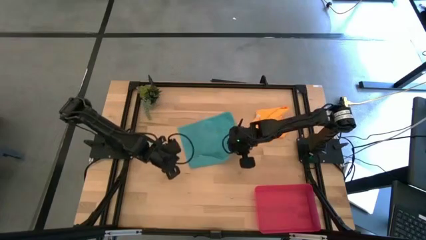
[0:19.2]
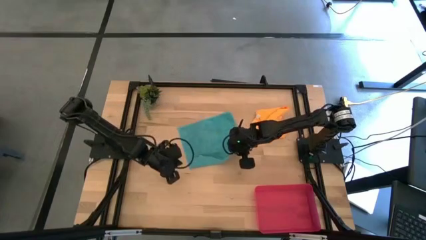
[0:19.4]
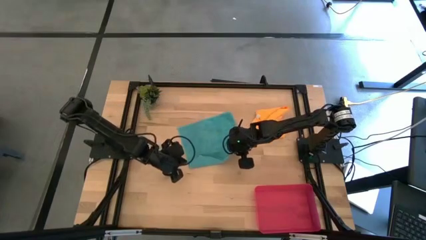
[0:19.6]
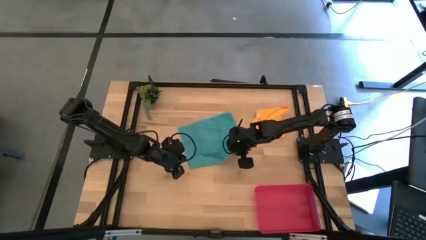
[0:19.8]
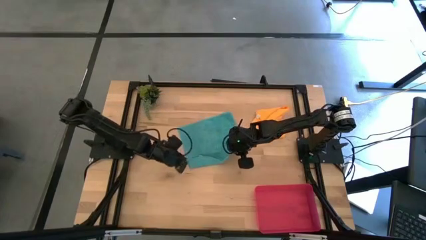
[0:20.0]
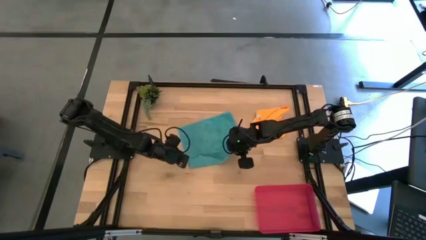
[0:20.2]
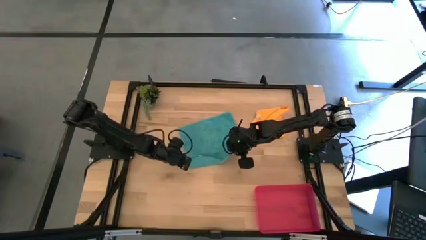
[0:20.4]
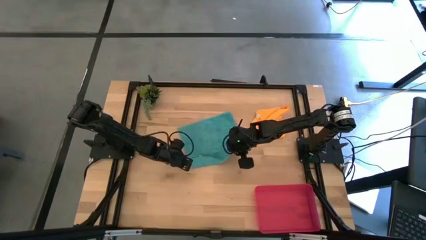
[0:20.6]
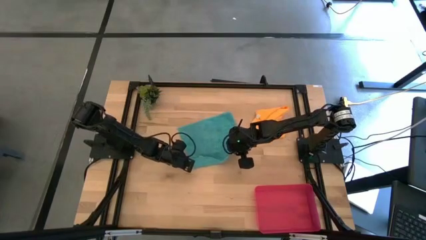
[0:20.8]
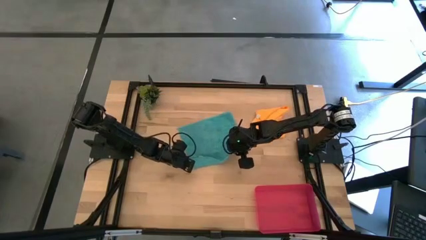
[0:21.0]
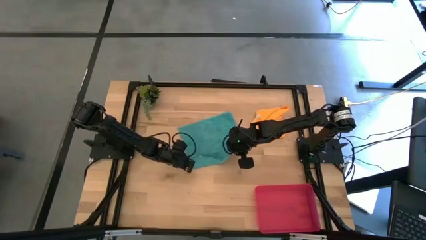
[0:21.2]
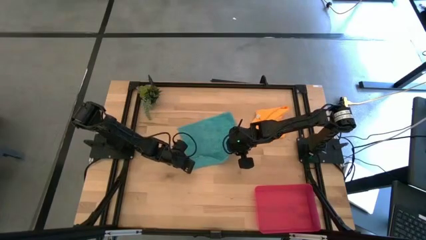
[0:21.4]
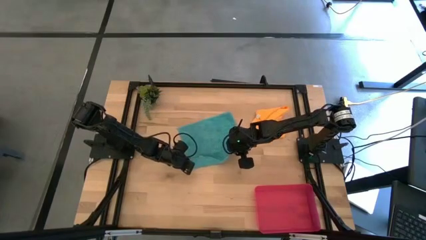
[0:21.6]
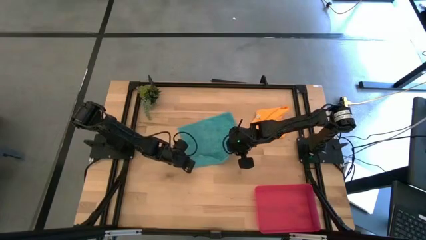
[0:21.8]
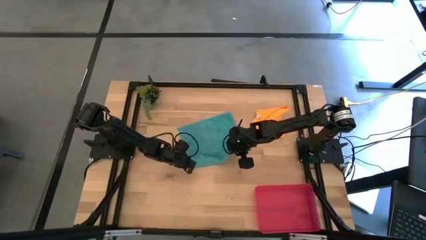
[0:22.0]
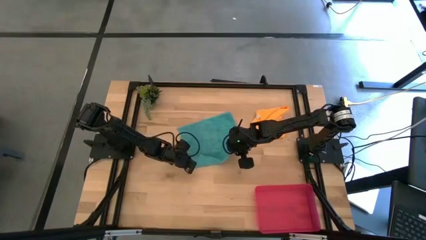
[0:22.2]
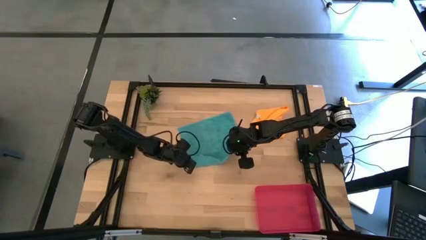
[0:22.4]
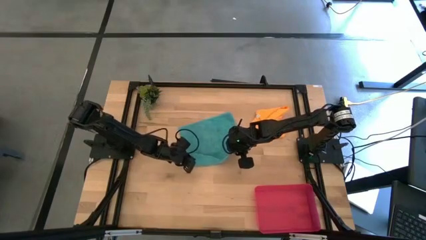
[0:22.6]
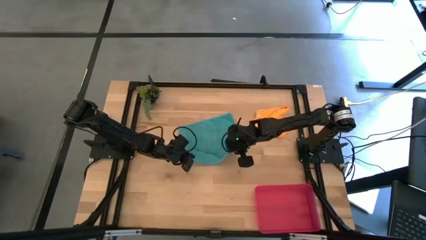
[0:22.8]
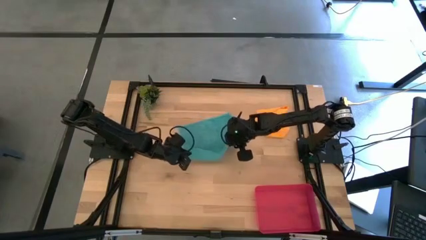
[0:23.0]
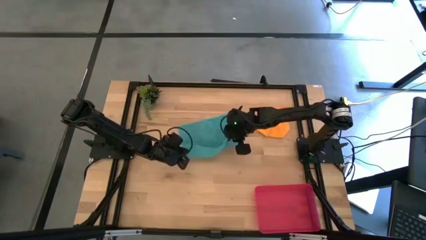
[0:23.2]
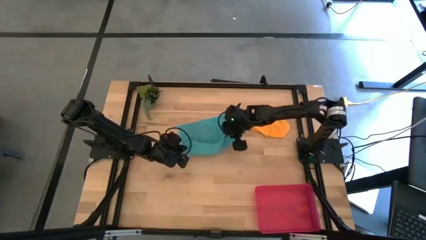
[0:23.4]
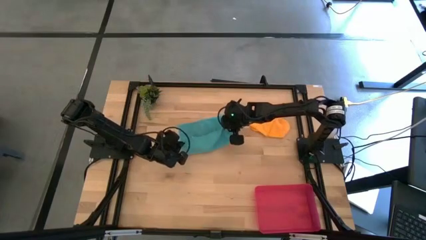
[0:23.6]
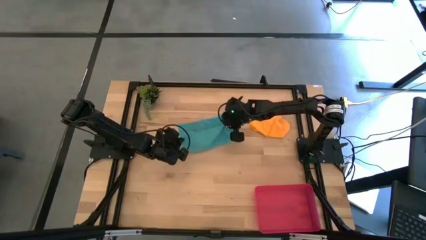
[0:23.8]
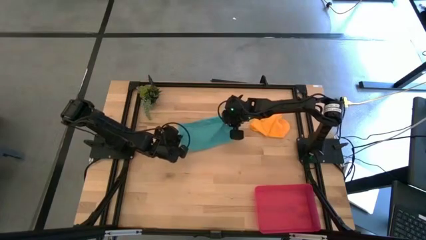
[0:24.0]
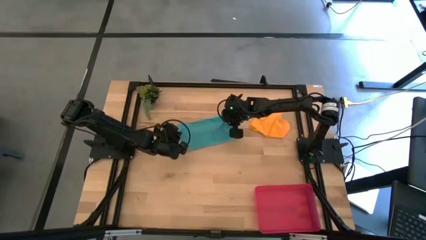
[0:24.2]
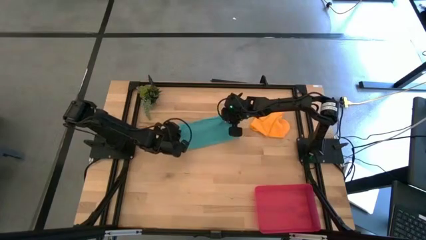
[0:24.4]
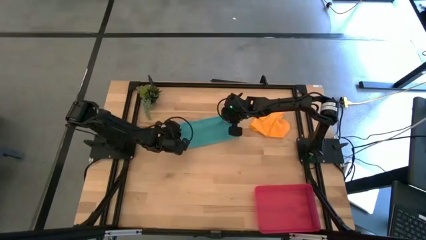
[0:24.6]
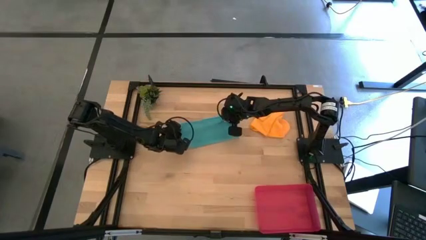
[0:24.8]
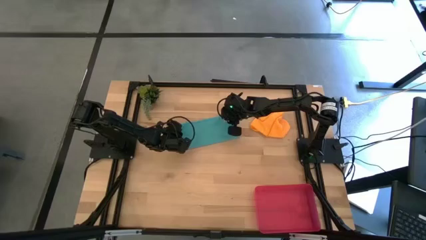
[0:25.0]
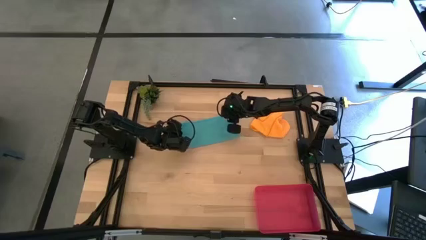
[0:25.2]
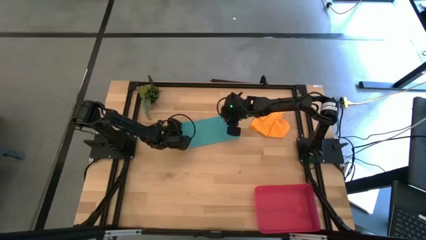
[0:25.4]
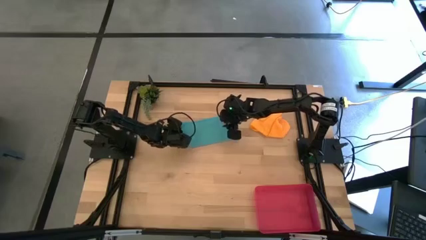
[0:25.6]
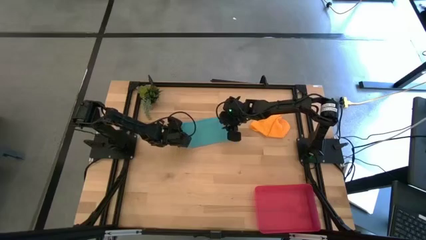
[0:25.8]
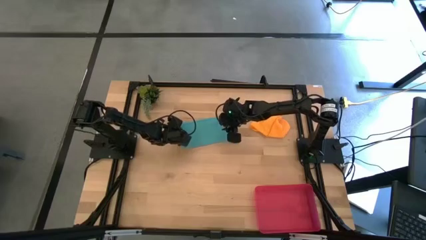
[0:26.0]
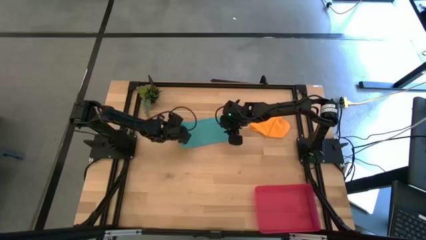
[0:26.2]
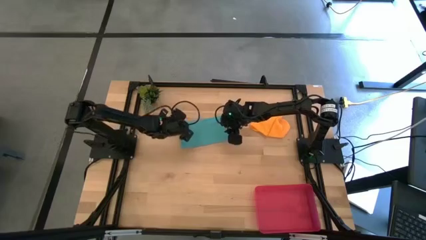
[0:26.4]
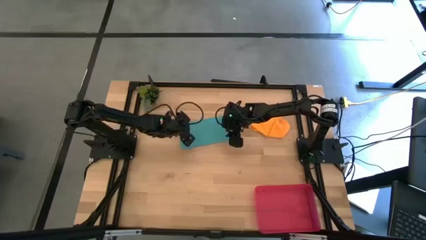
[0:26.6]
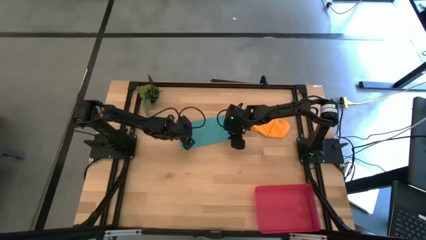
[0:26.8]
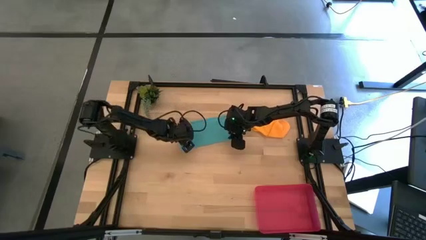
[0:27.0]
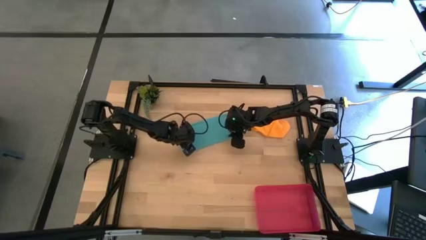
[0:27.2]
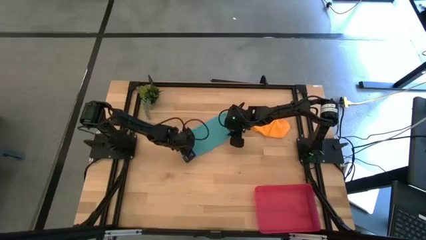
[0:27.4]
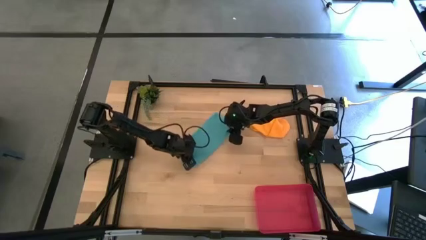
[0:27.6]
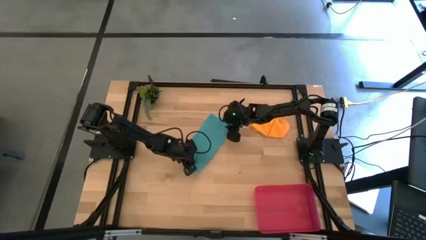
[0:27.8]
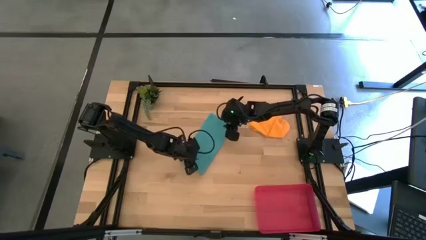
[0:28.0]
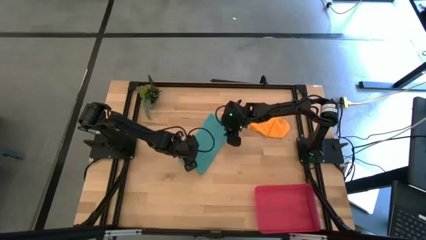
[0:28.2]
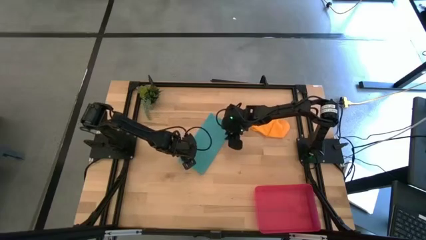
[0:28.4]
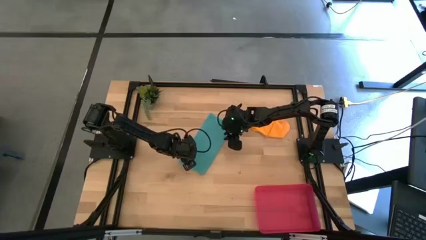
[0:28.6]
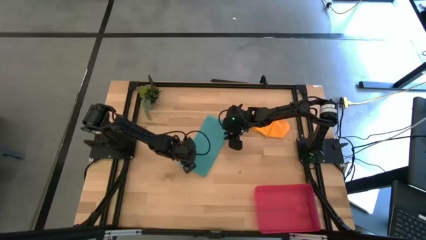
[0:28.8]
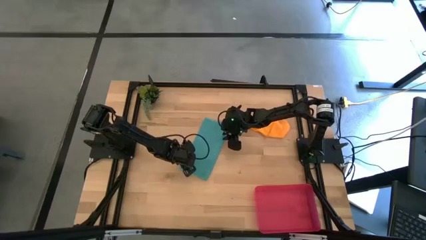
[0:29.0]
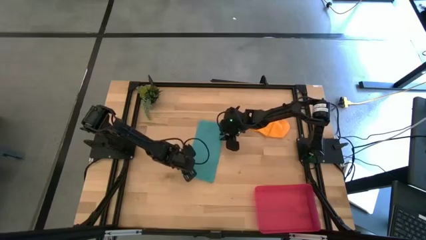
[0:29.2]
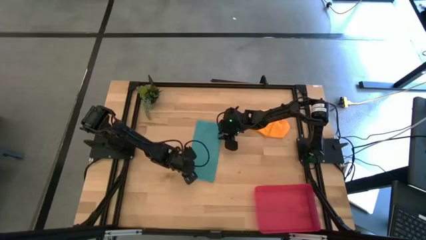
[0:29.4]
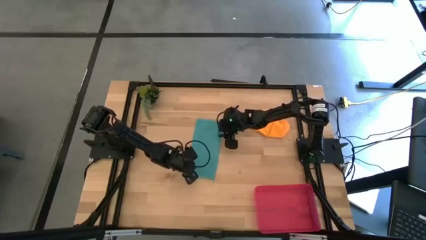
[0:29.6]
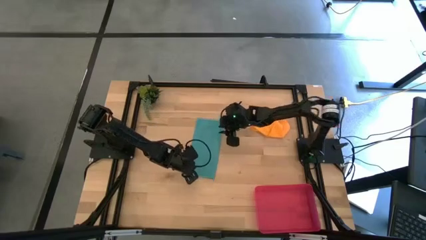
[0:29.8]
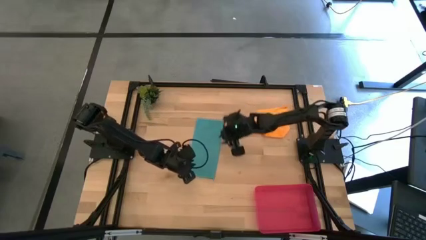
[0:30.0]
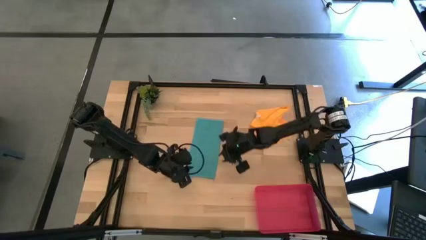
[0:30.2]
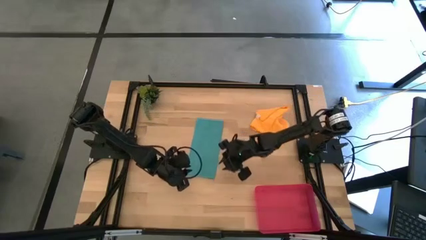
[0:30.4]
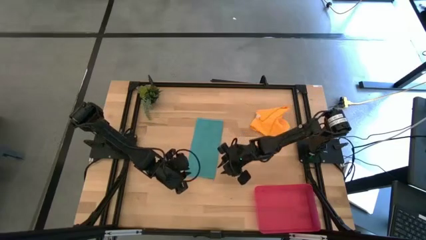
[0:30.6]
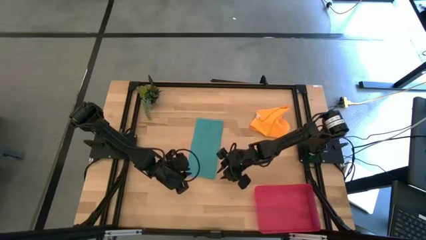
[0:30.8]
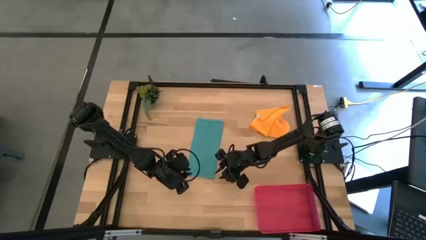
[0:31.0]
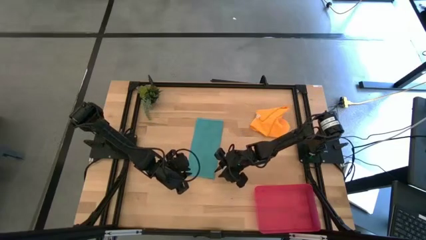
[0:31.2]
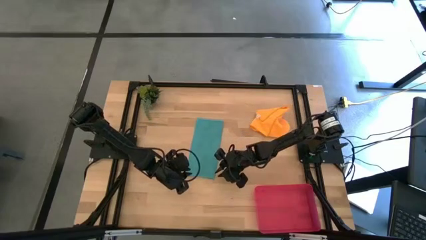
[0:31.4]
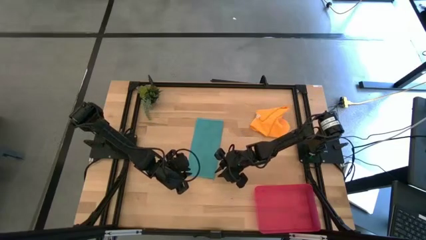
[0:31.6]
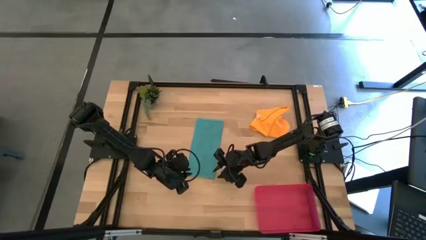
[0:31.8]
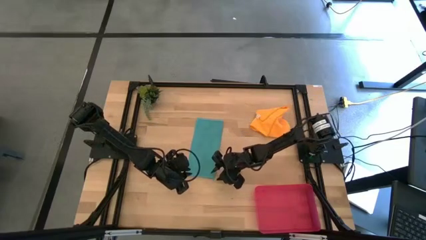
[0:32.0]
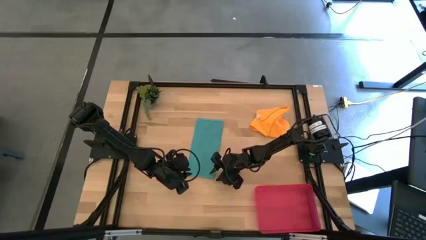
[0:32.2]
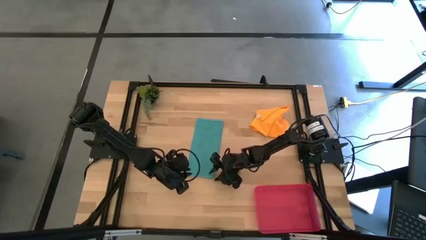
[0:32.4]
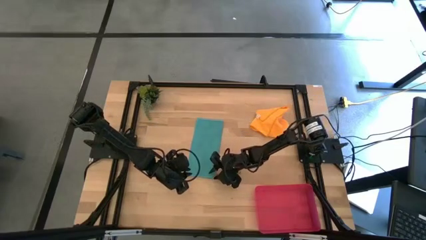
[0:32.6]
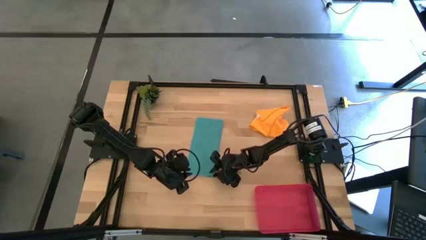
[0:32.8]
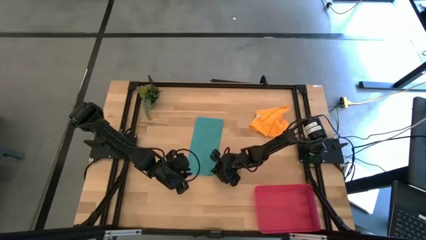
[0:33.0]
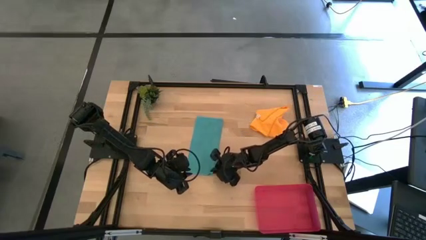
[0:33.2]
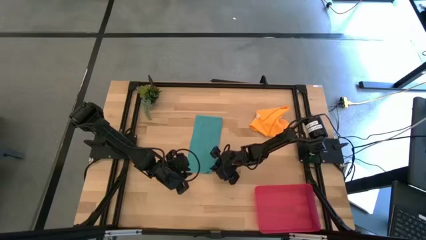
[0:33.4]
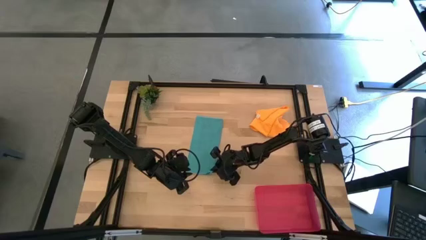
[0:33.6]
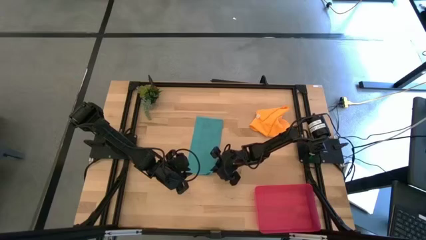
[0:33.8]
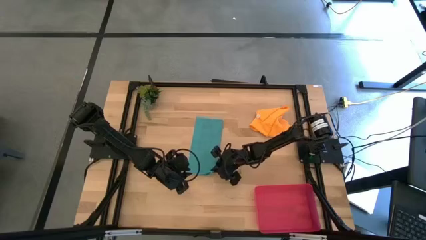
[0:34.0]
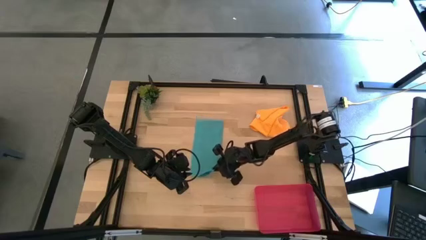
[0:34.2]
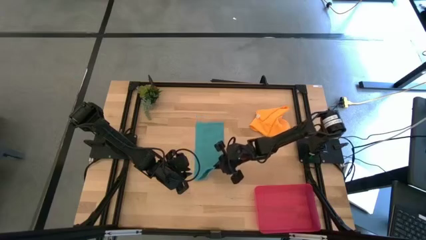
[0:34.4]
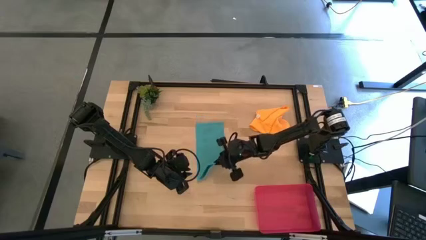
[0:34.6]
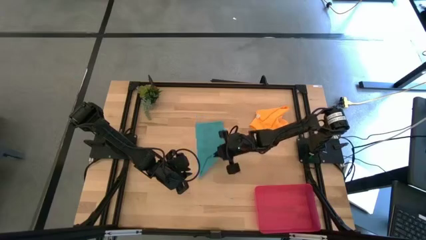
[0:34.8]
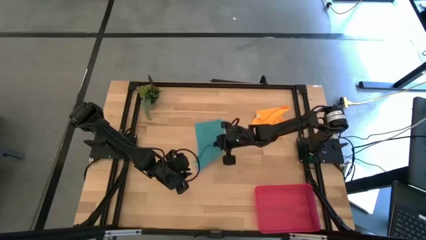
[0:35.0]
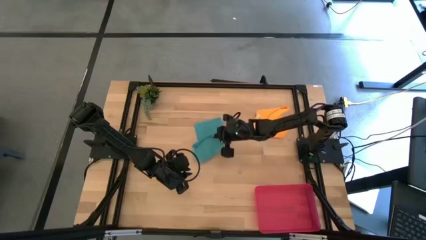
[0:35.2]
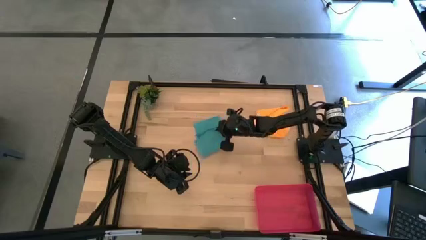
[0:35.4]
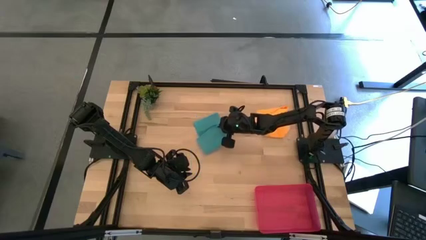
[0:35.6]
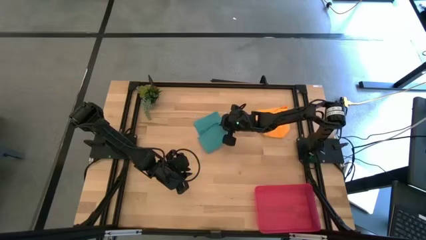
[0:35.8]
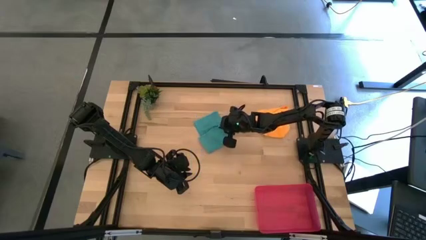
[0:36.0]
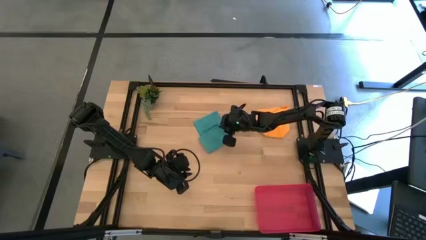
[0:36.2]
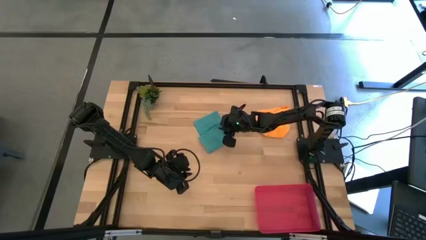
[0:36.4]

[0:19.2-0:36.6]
Task: Roll microfiber towels into tight, uniform cylinder then place into a basket
Fold the blue microfiber cloth
